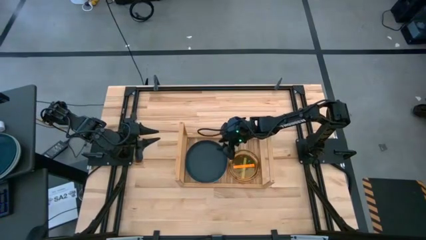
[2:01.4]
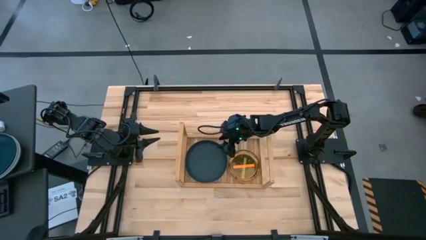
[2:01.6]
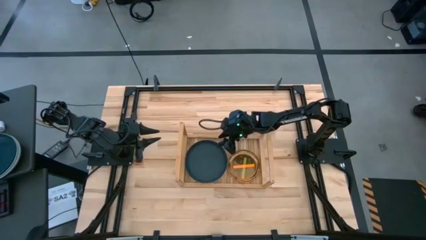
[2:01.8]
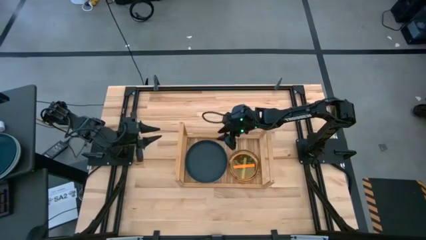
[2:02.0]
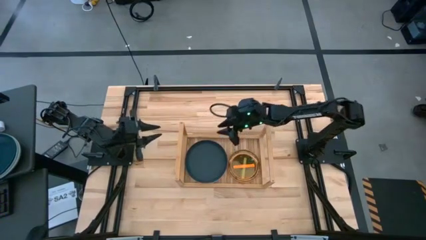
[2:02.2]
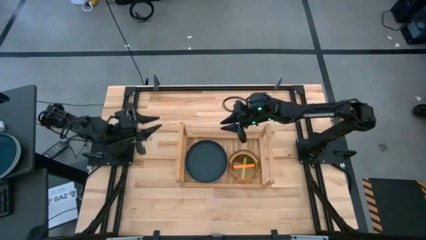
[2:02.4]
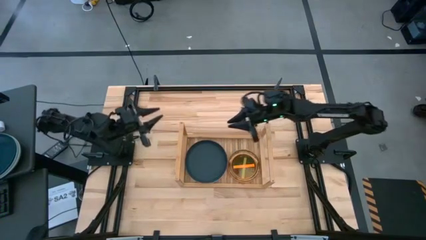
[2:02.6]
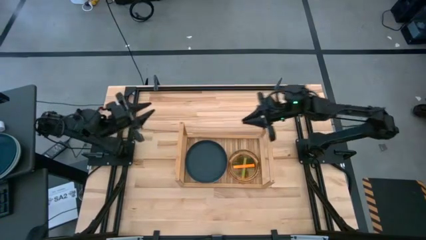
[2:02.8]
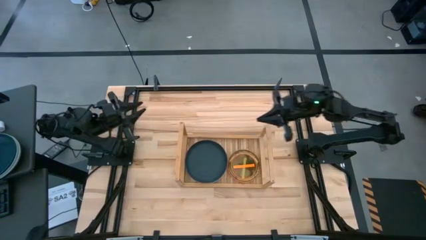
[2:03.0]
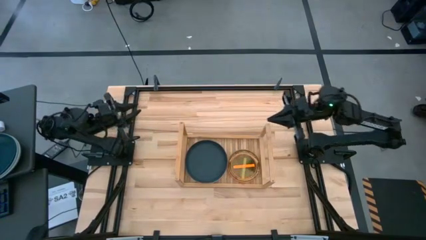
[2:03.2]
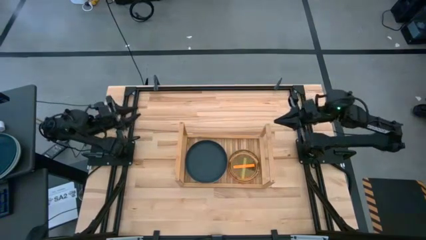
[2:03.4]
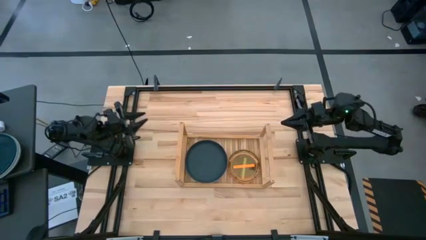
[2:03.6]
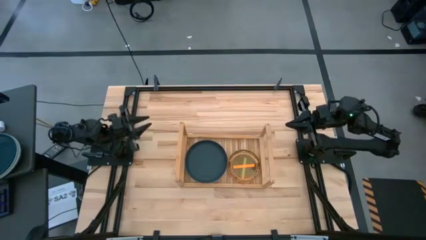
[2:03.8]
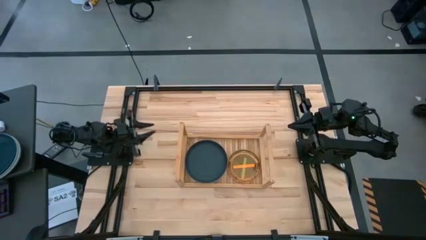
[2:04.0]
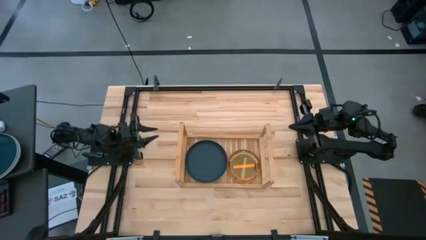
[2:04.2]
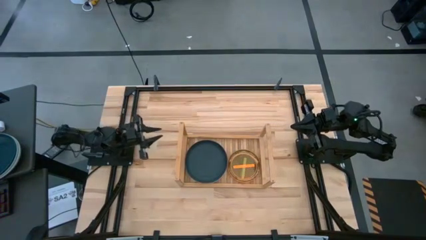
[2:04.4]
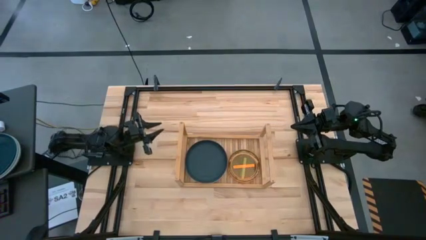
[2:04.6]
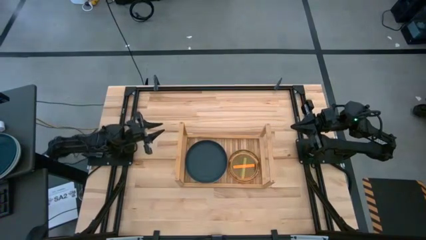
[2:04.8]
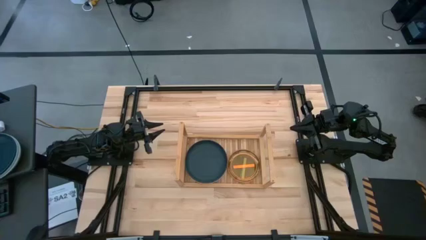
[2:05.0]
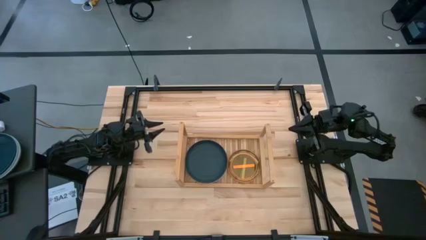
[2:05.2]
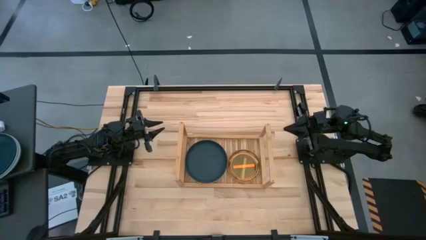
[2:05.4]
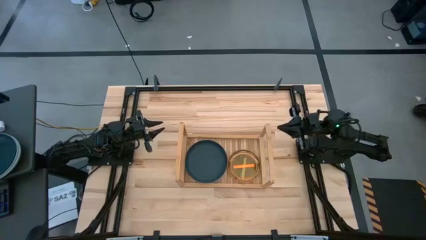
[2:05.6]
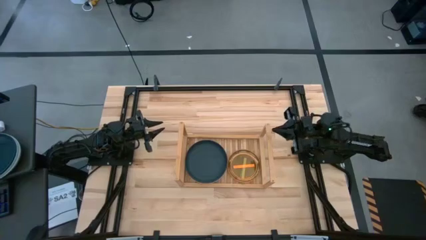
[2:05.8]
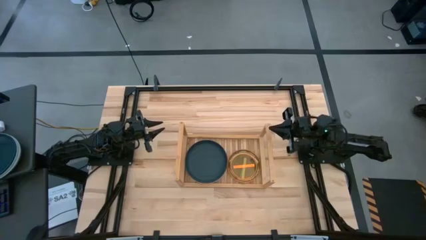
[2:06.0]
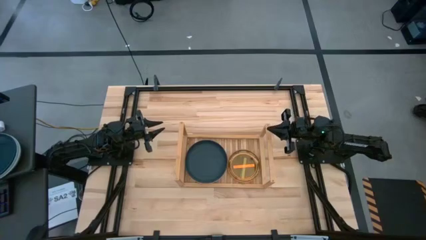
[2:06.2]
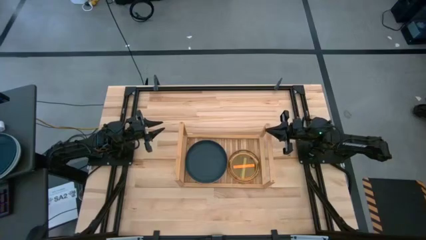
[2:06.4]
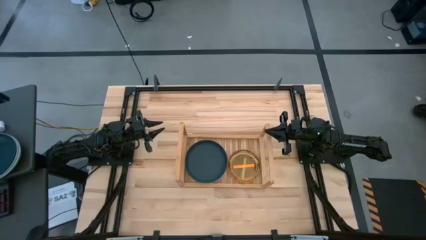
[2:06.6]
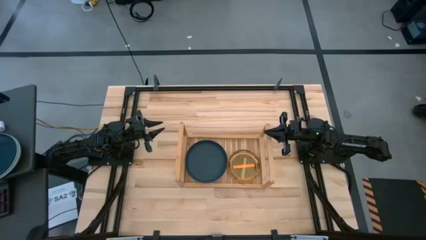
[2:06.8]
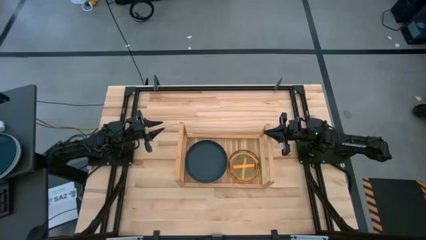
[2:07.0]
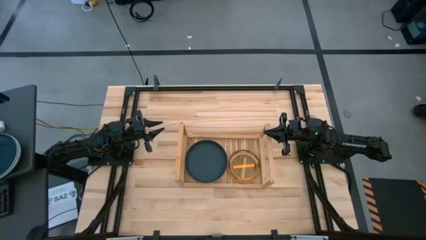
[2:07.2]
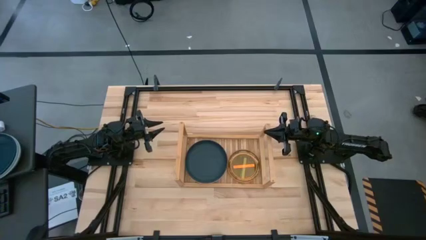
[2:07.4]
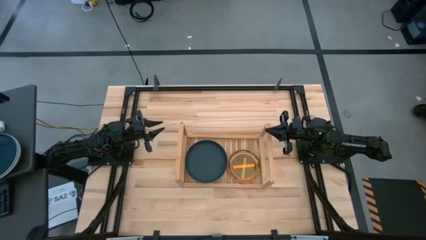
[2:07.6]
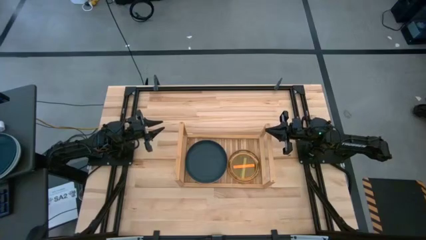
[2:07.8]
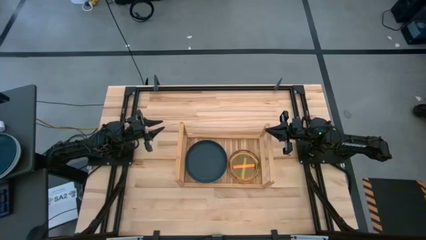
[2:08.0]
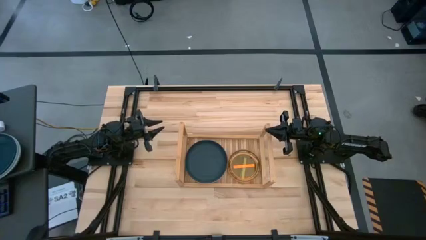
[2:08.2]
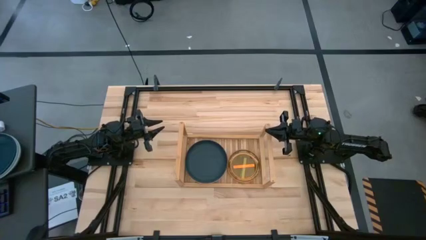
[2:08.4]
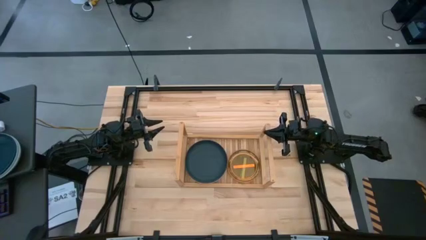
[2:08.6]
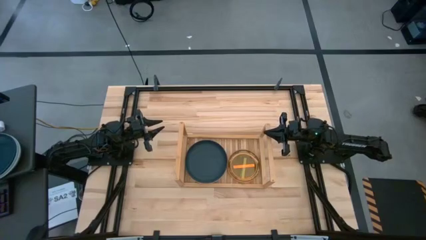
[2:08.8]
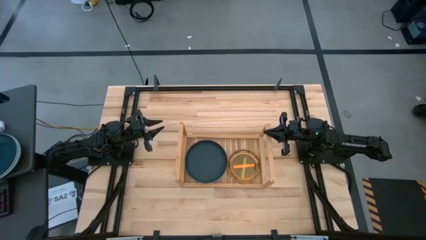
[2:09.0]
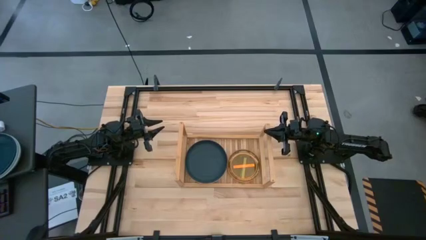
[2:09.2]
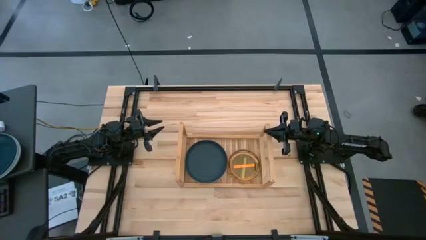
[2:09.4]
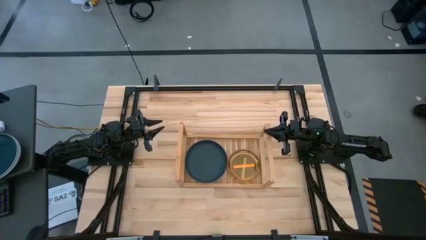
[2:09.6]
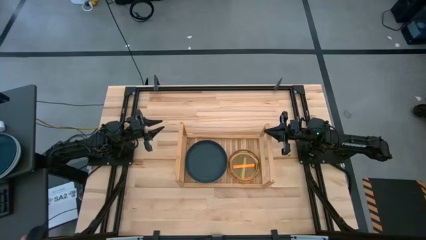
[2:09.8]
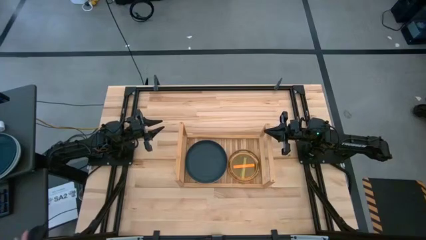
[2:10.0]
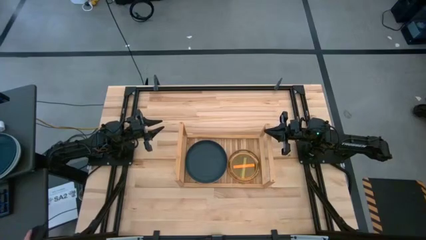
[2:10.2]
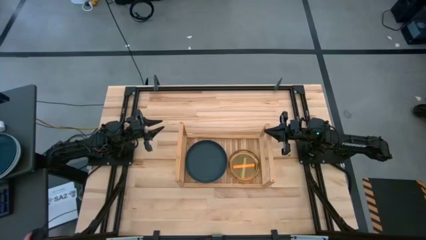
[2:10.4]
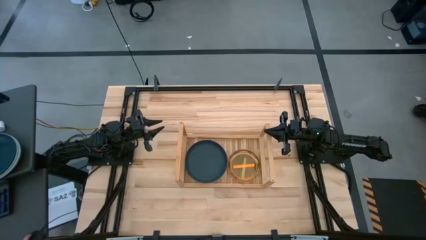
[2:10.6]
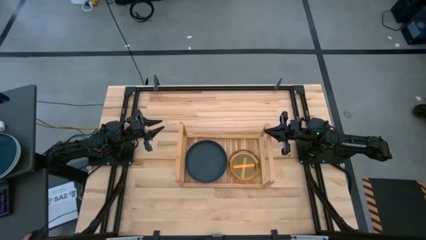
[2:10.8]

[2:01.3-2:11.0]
Task: Place and stack plates onto a shelf
Return to Home Position

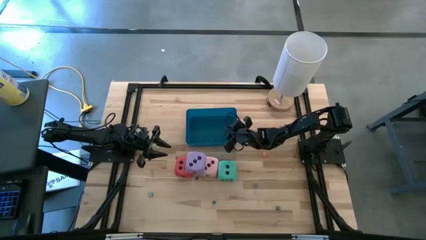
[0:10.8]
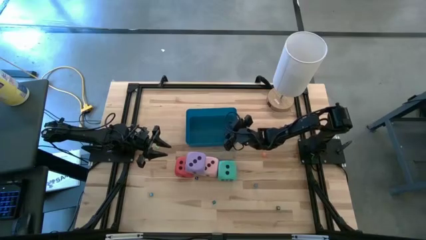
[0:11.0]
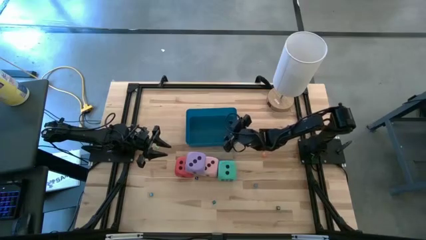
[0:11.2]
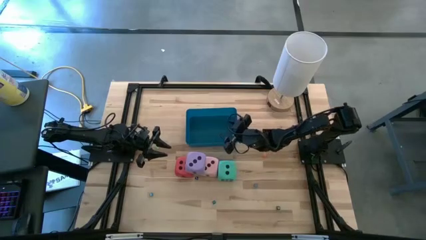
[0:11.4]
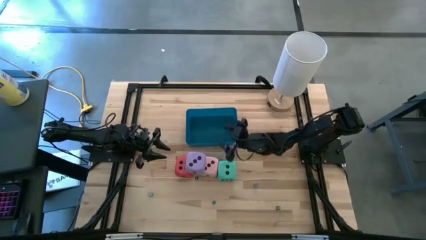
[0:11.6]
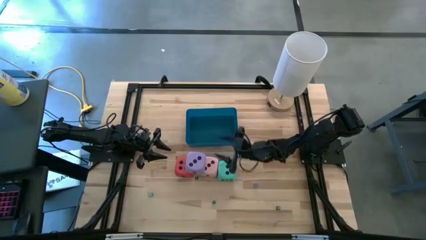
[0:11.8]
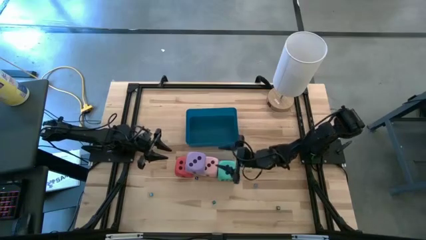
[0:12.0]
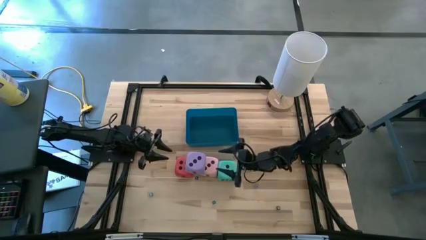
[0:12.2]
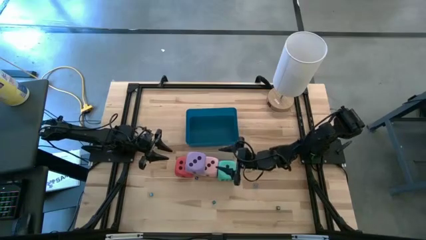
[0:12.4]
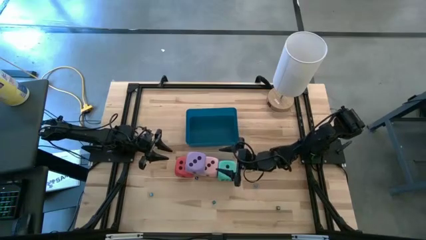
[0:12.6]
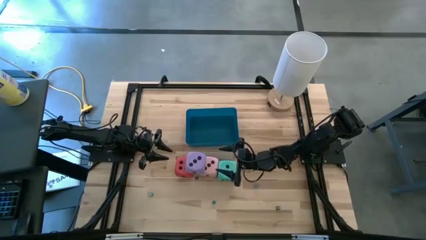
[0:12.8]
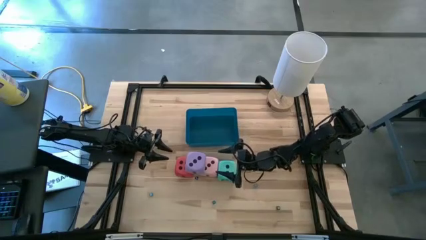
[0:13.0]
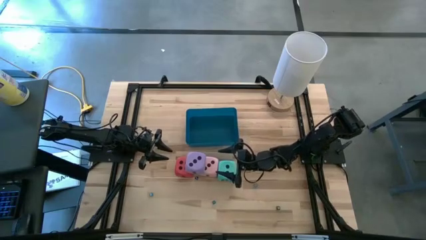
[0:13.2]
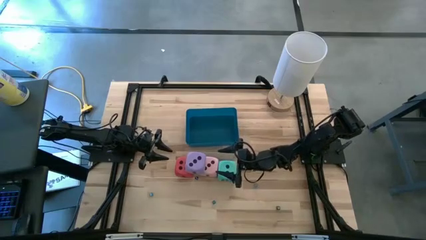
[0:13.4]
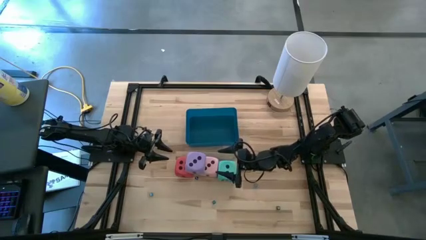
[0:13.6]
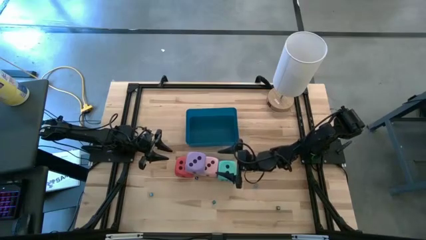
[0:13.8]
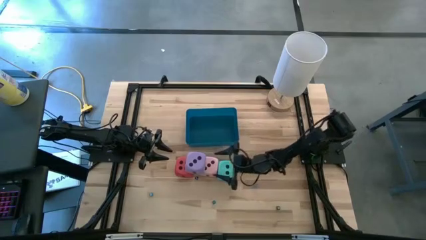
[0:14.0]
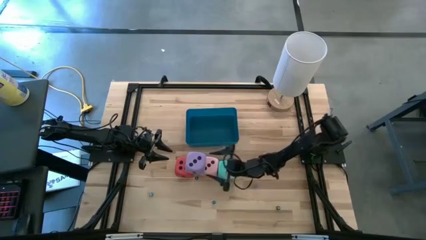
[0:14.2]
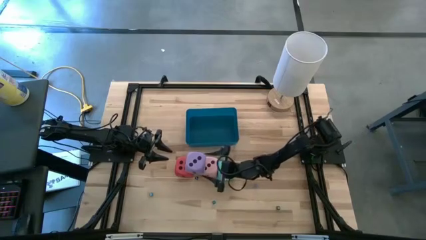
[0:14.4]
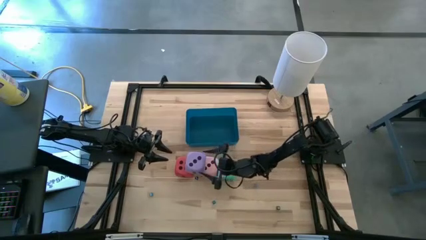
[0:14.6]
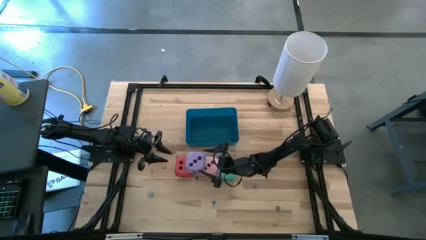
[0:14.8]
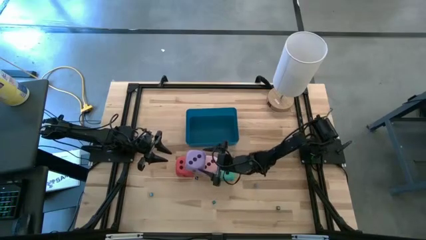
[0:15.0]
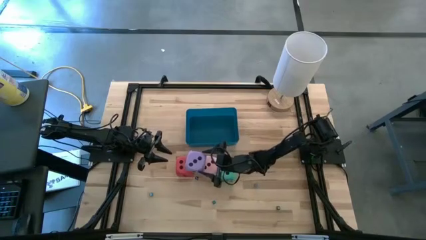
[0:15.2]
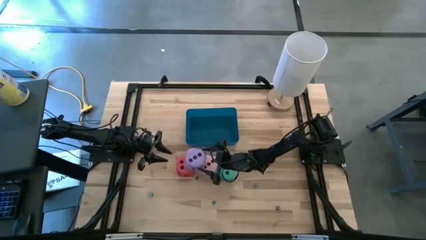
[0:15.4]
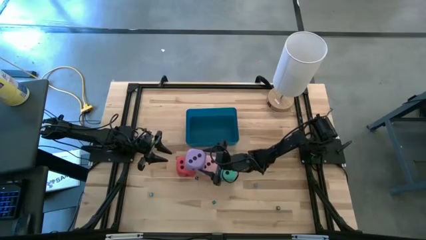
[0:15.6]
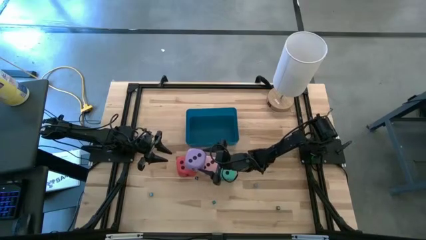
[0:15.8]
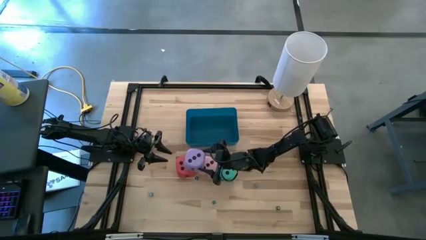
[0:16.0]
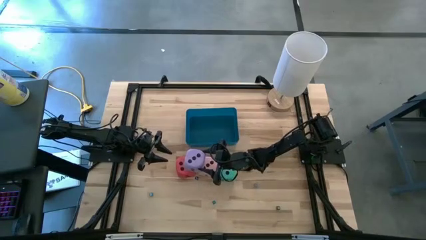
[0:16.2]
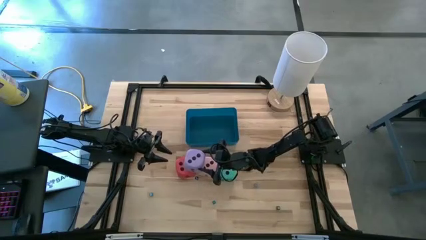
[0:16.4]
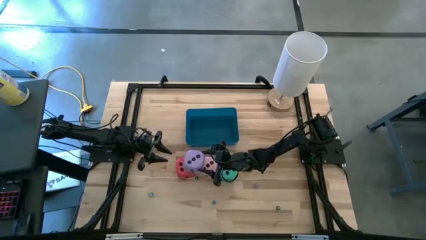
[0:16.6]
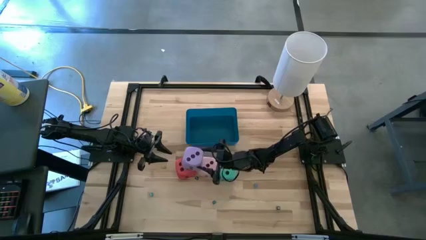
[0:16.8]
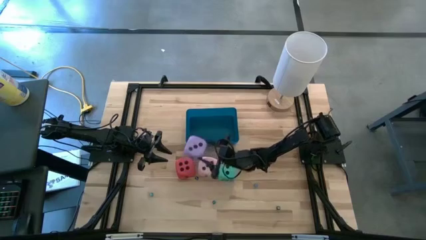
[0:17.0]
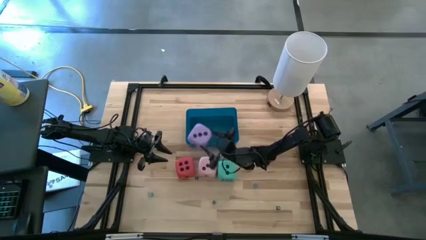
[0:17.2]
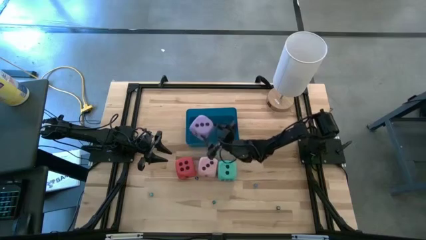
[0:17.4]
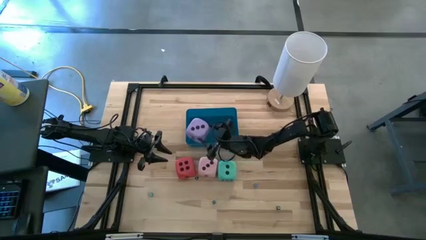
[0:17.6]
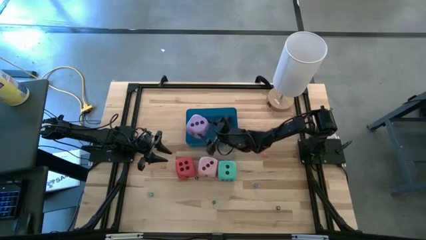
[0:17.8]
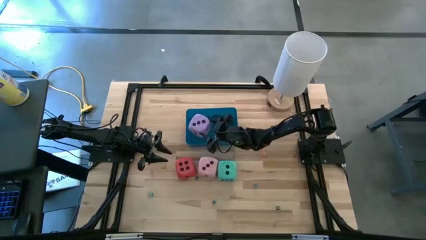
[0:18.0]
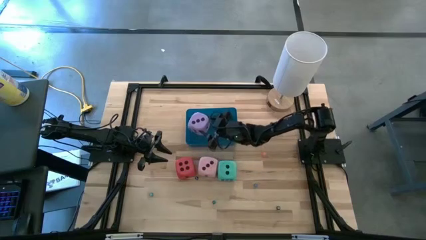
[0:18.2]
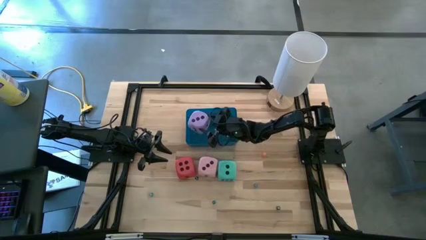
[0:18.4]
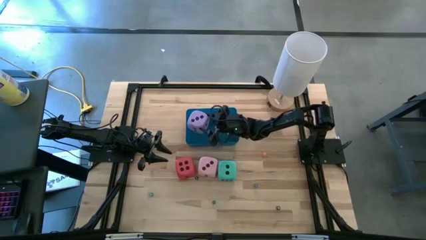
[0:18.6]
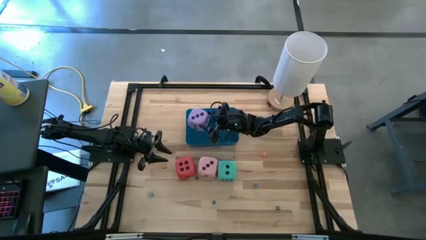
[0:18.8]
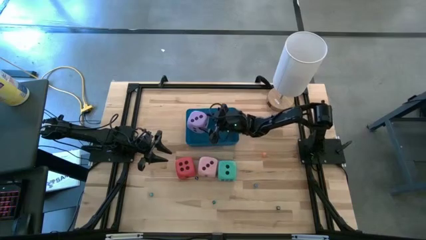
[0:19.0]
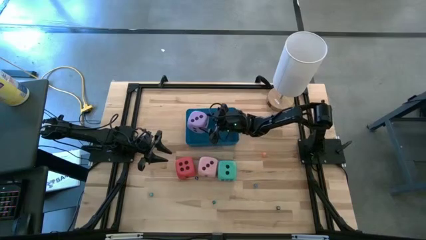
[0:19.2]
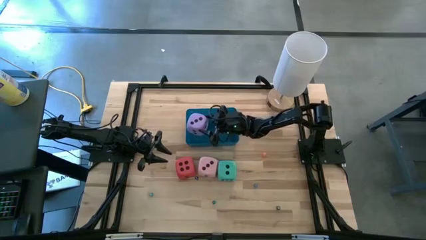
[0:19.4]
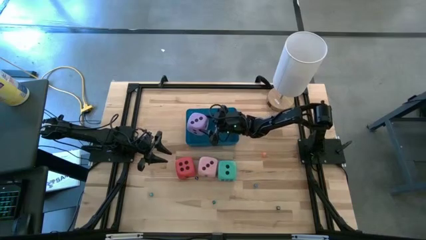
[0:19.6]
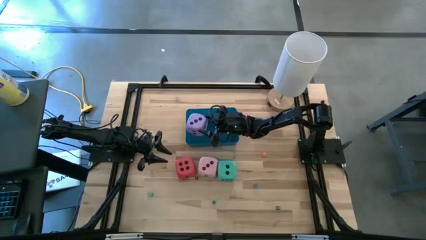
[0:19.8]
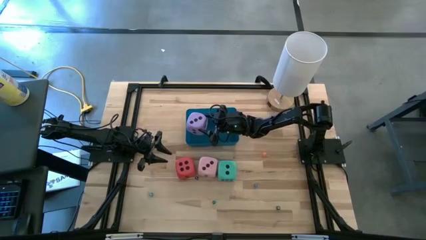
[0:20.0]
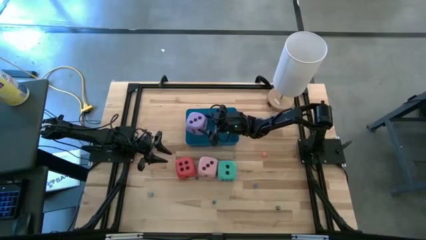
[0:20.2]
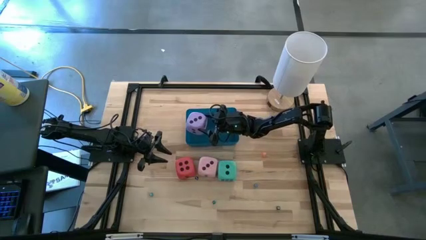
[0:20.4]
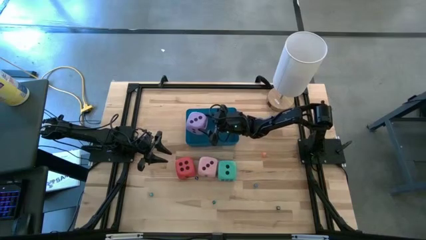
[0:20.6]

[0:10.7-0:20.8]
Task: Pick & Place Dice
Put the violet die into the blue bin
